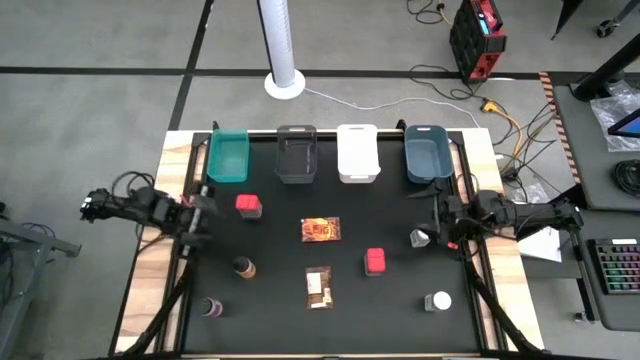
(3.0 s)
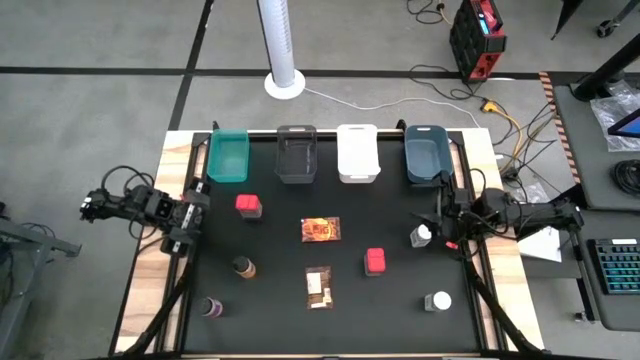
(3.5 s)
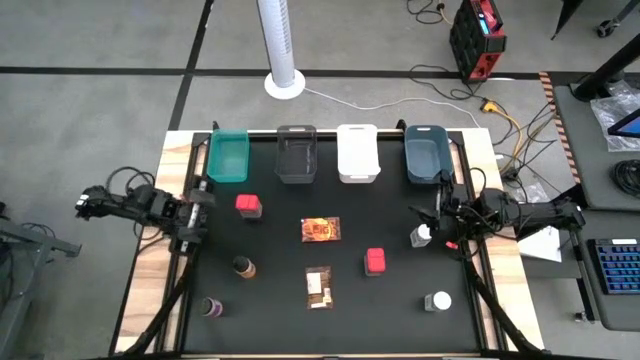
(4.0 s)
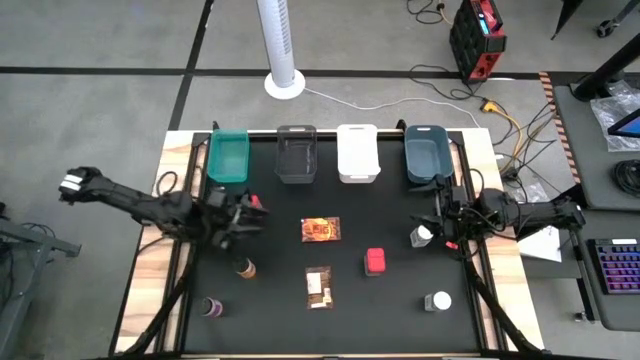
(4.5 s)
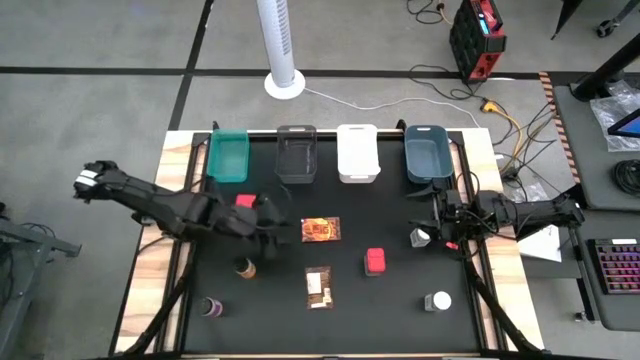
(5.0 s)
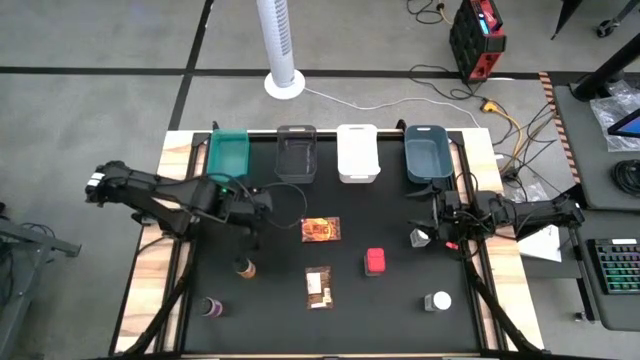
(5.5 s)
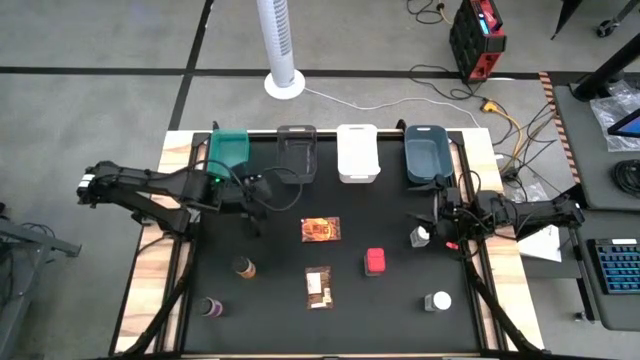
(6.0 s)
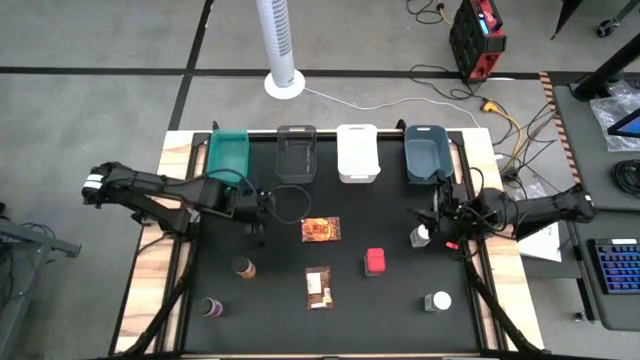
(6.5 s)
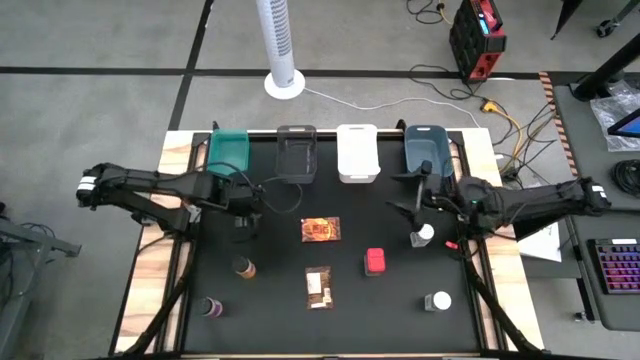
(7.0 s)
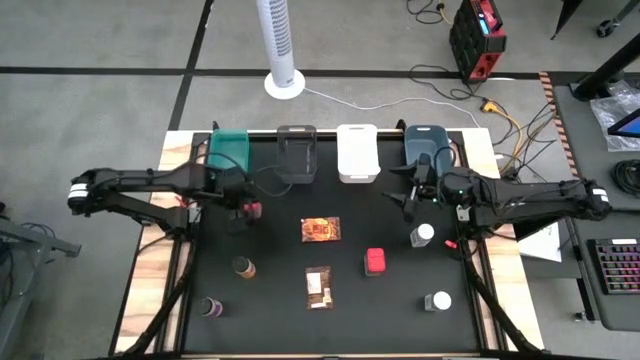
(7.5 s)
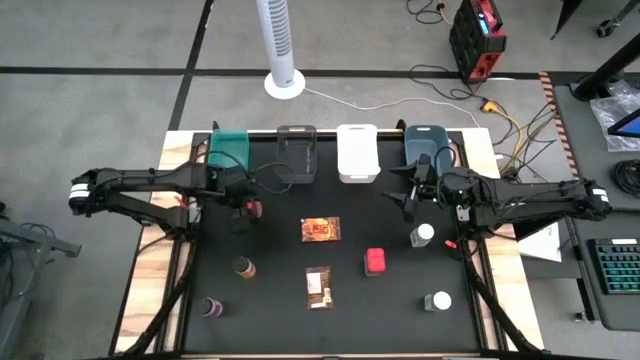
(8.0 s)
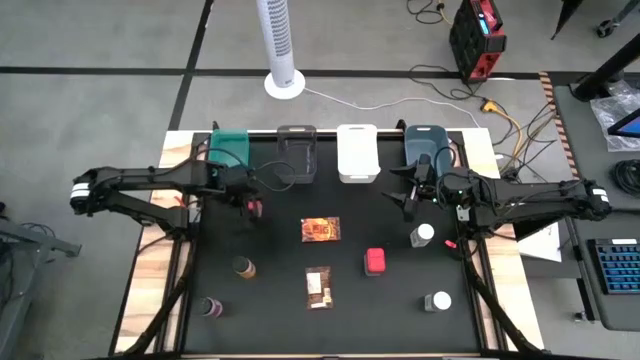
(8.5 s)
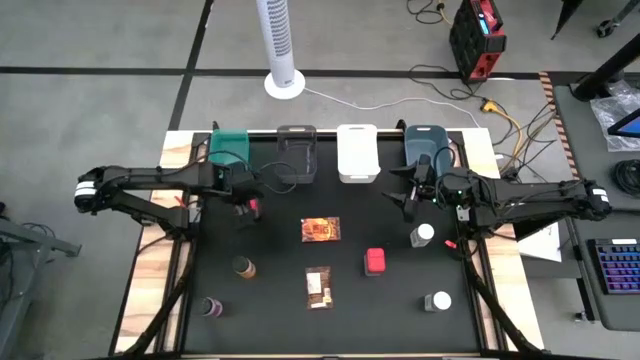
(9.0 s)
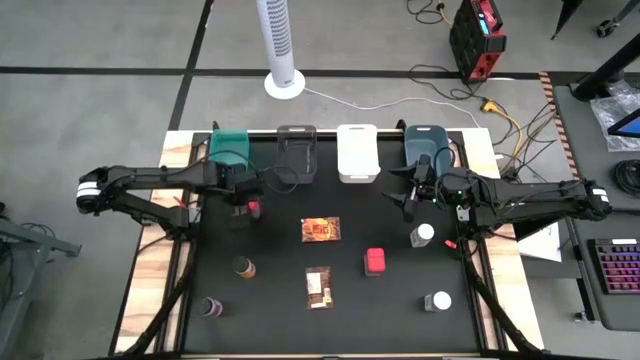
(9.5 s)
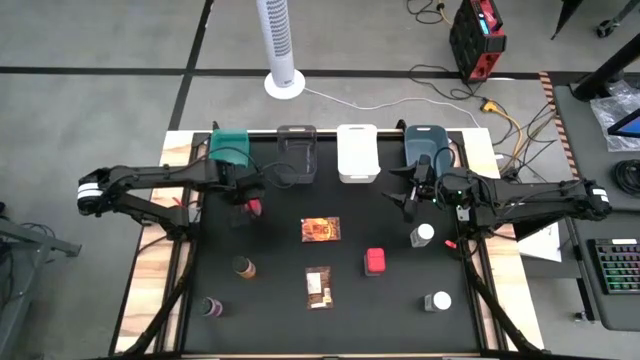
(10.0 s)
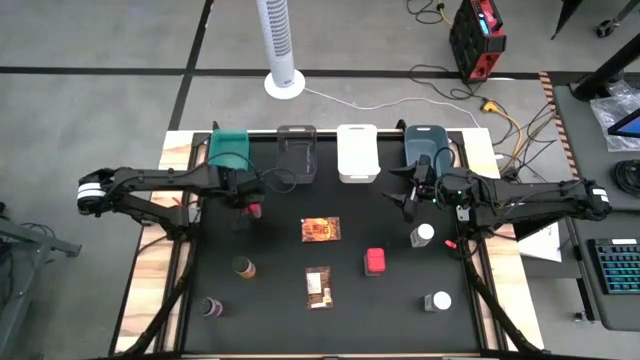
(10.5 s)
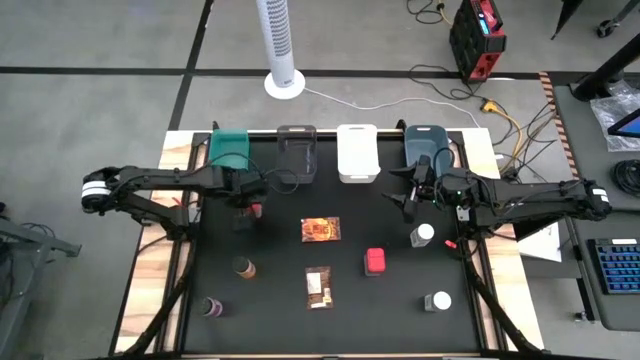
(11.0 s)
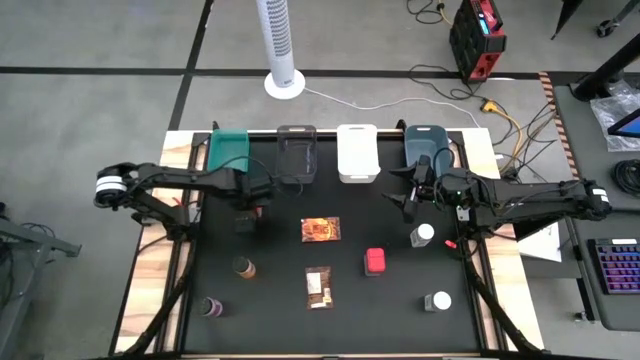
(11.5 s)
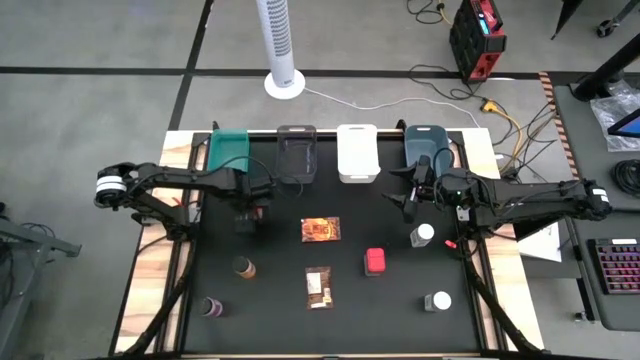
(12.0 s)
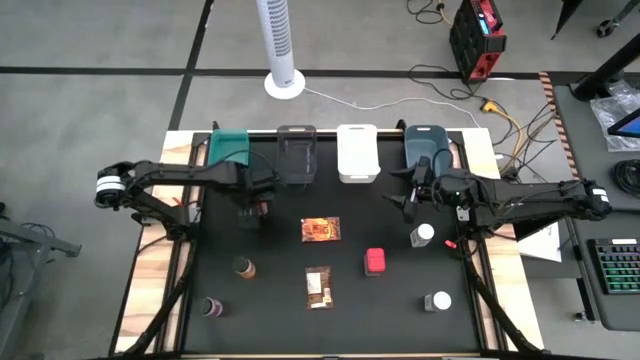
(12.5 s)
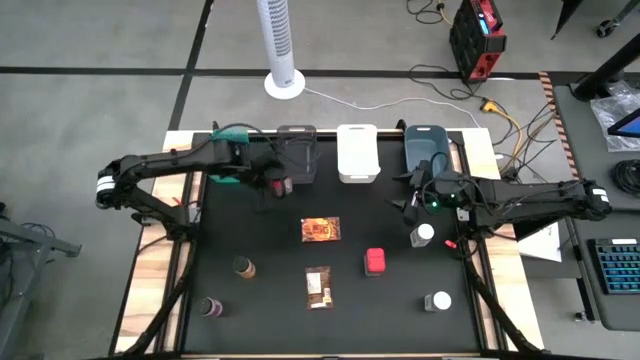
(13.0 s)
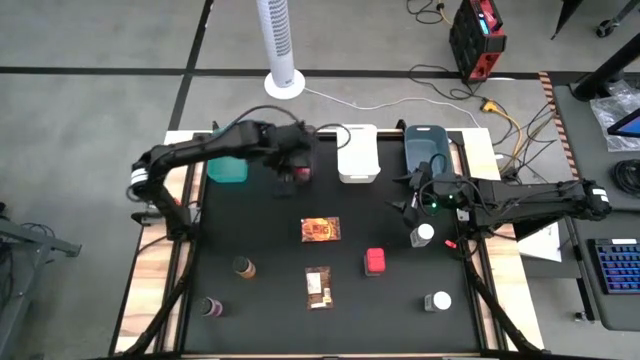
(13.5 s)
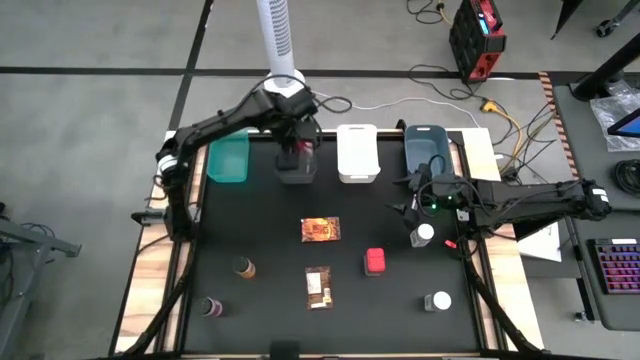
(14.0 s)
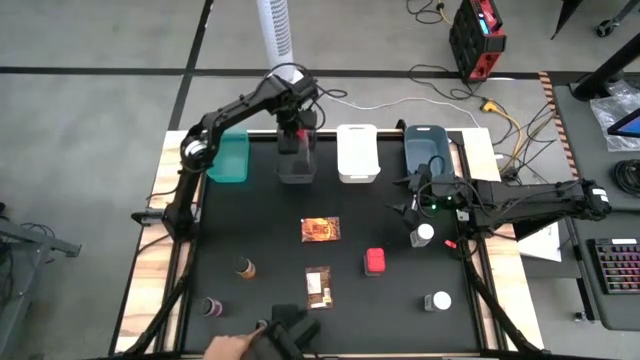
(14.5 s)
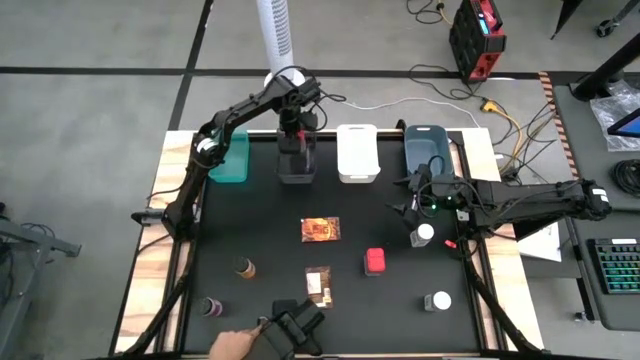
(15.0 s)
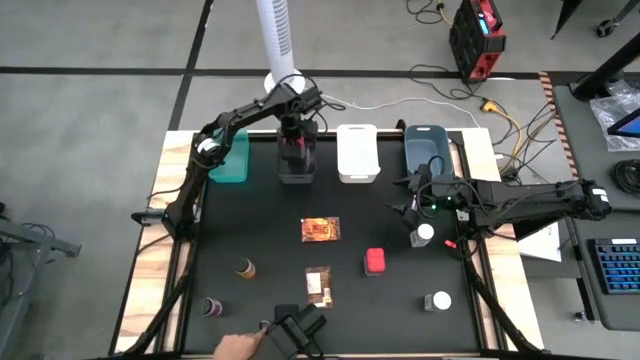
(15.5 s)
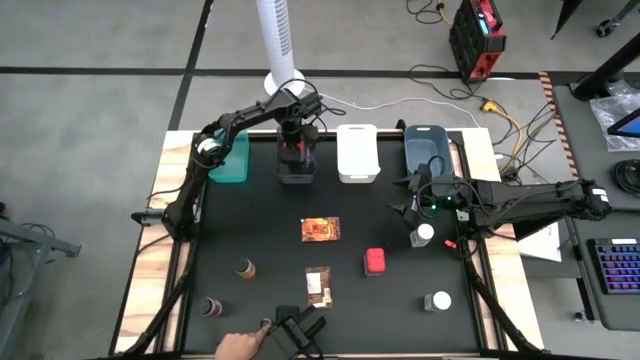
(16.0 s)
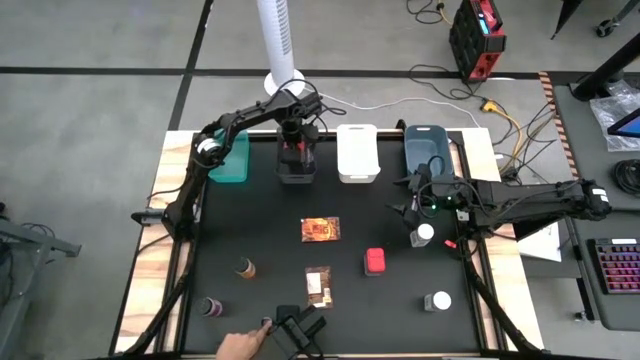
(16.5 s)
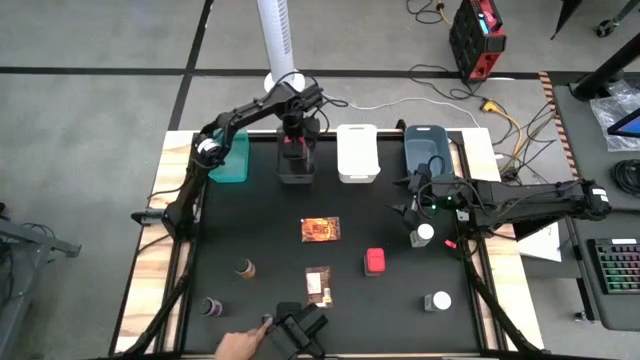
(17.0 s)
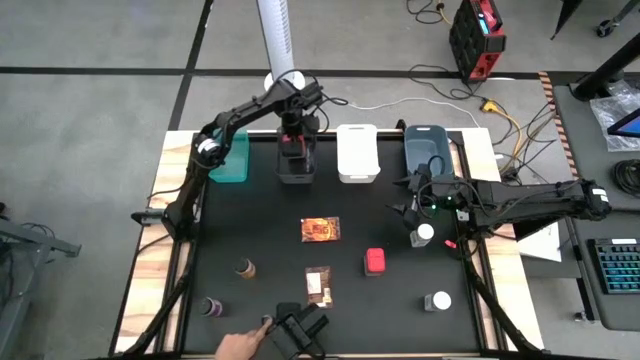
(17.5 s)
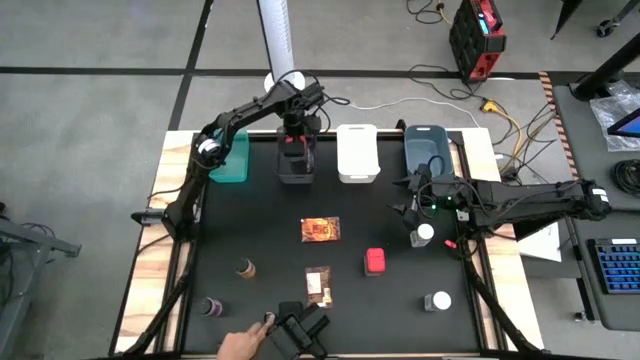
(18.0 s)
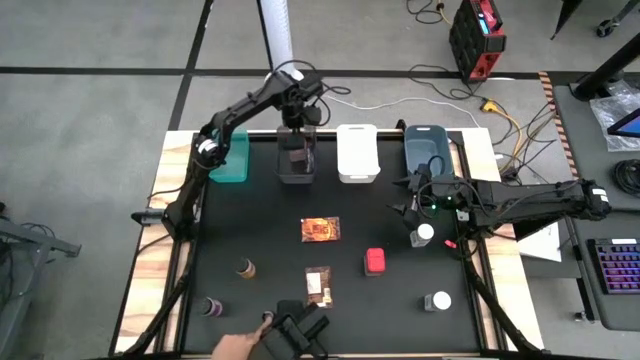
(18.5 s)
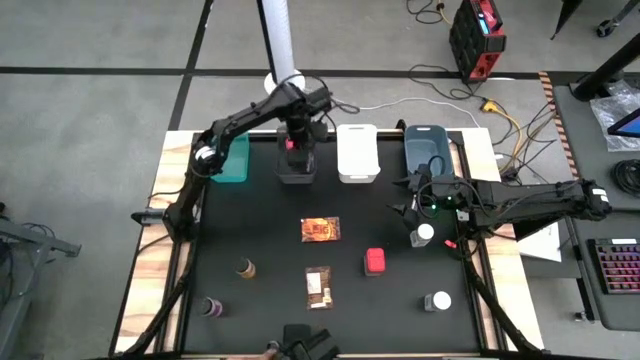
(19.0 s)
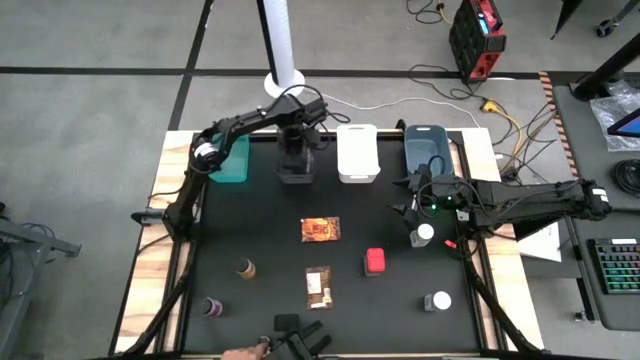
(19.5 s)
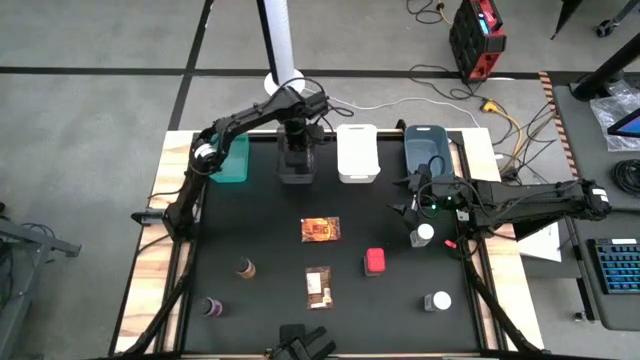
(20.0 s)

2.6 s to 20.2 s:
Task: Sort spices by type
Put the top red seasoning can into the black bin
